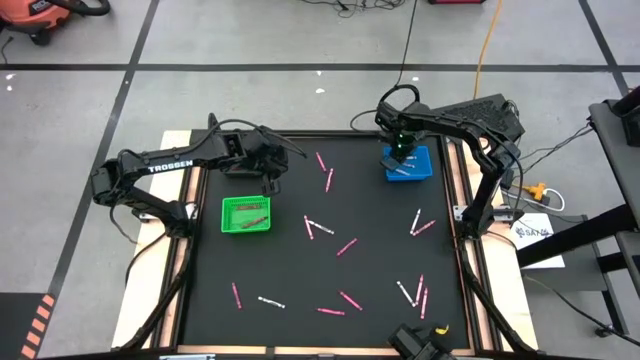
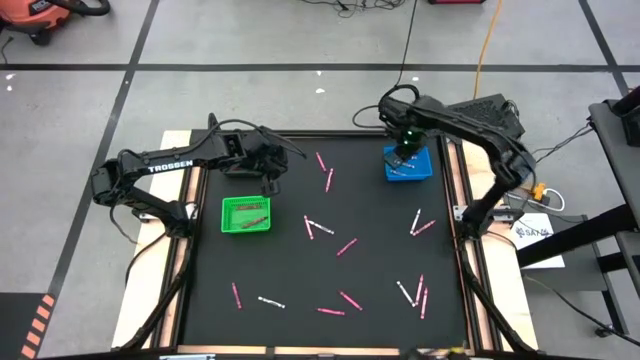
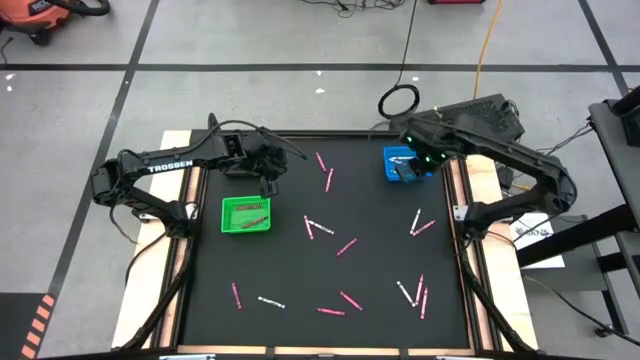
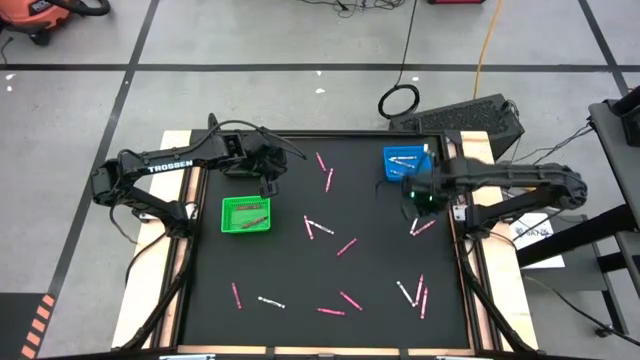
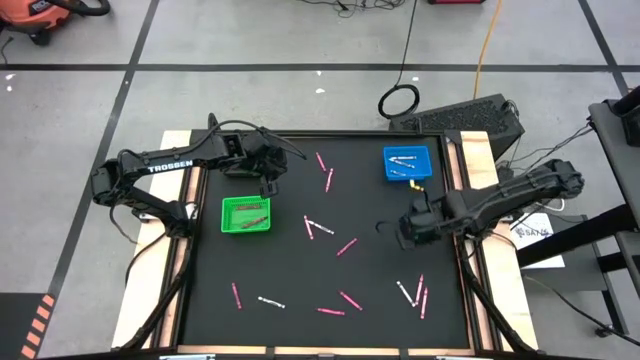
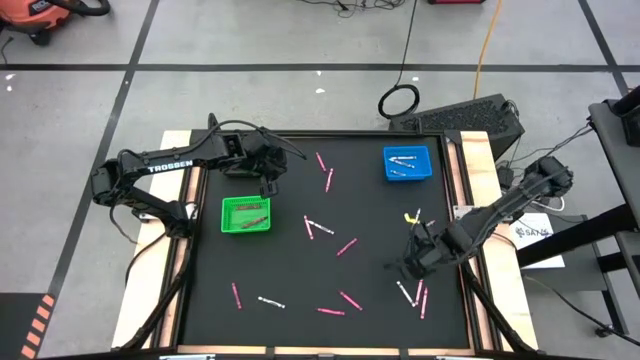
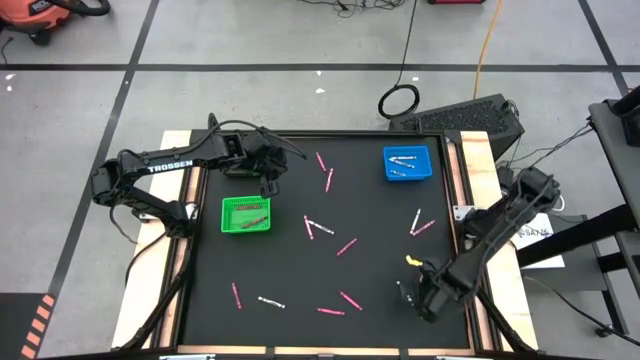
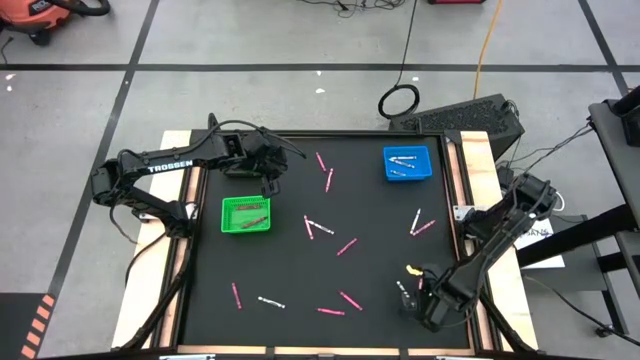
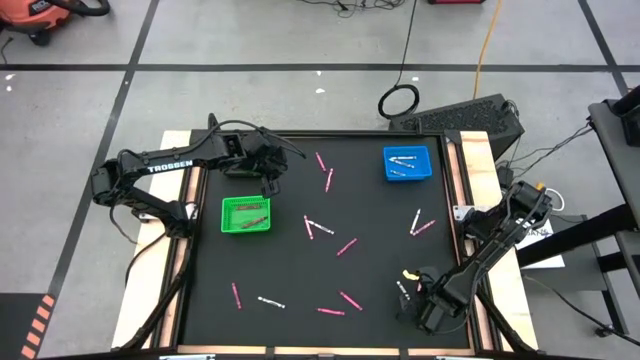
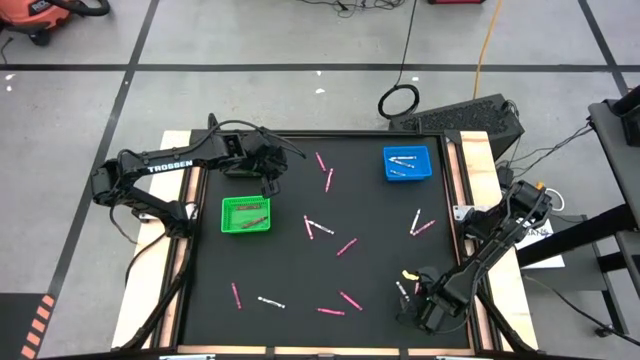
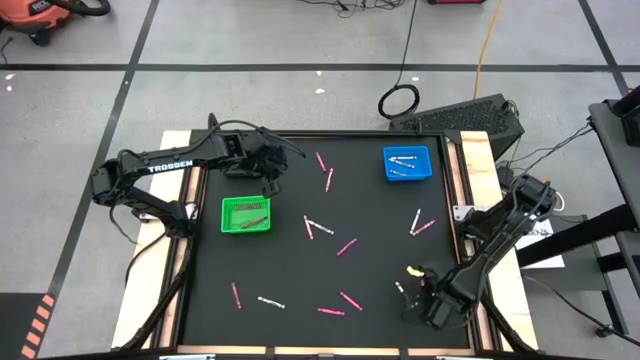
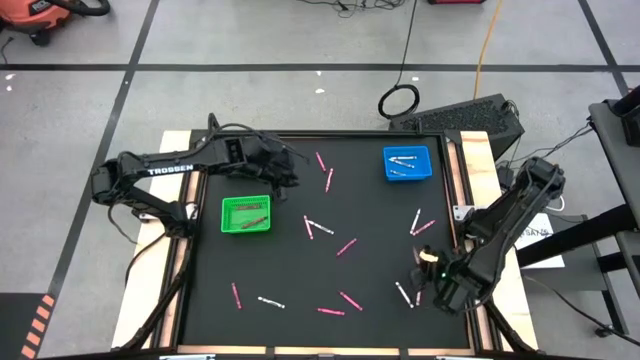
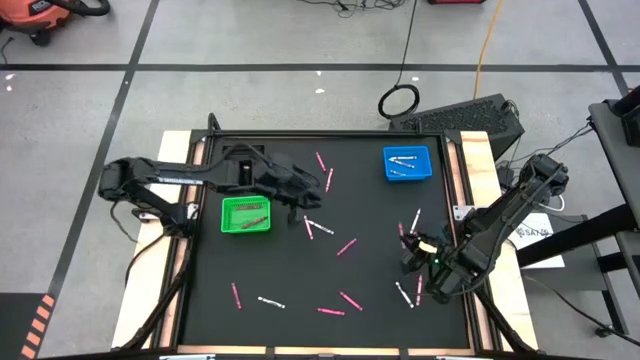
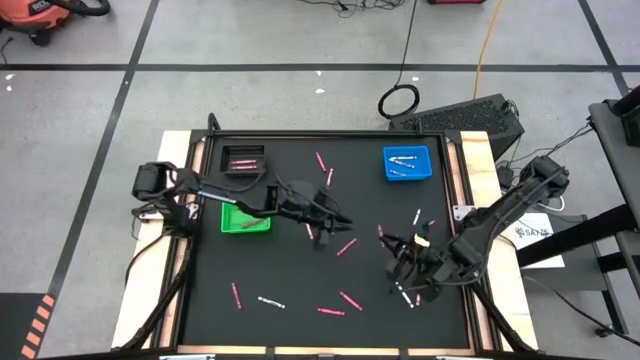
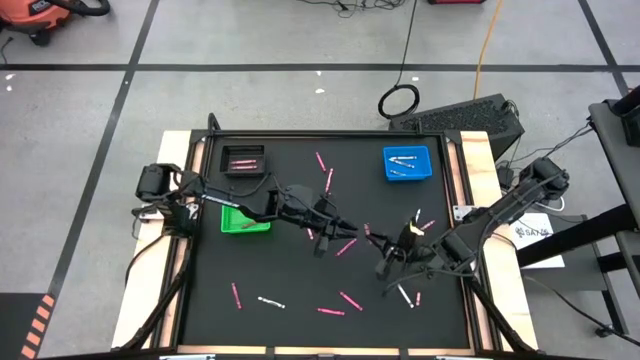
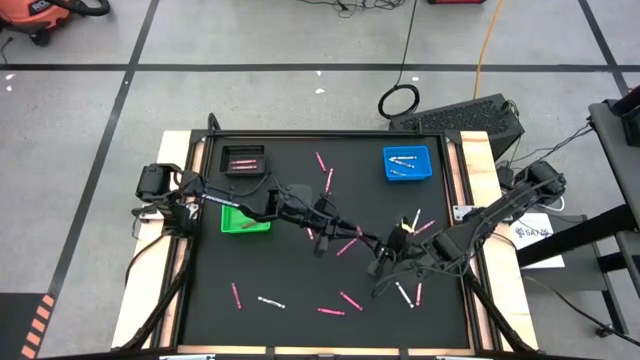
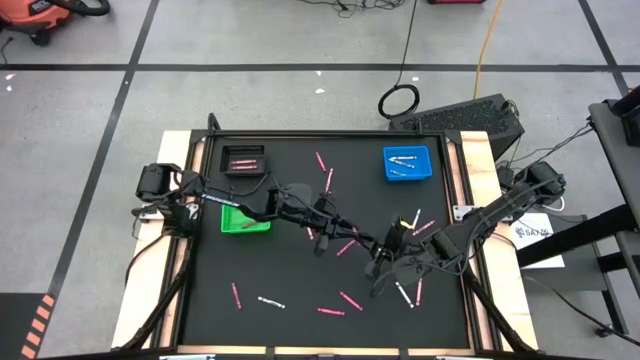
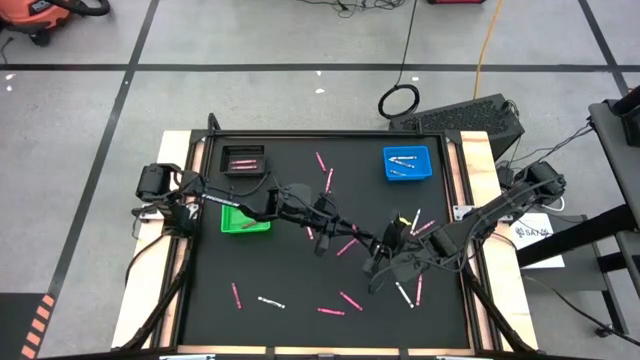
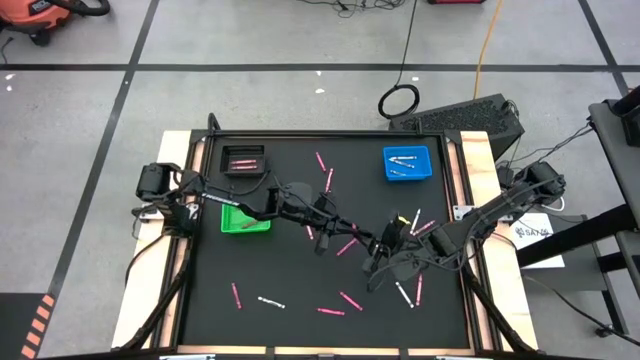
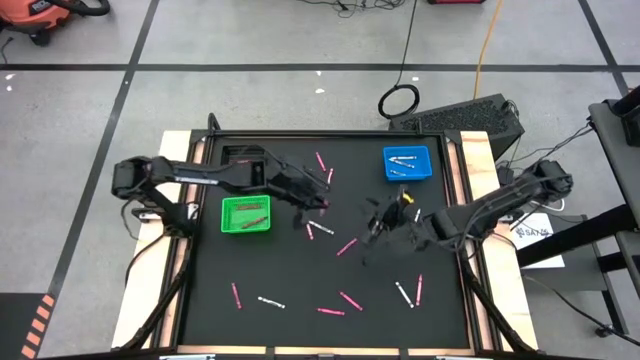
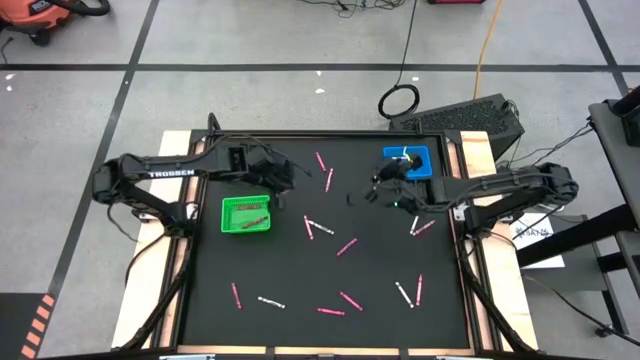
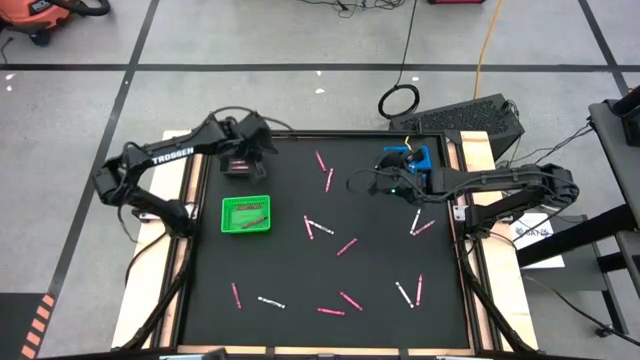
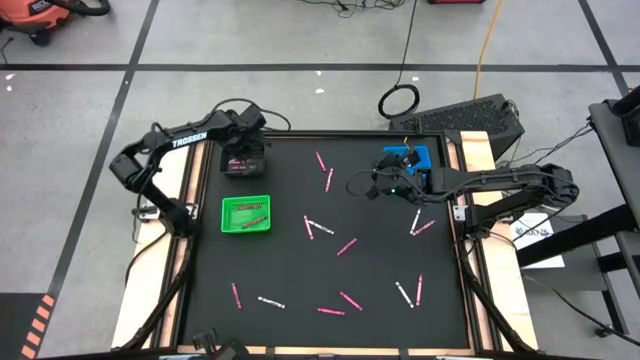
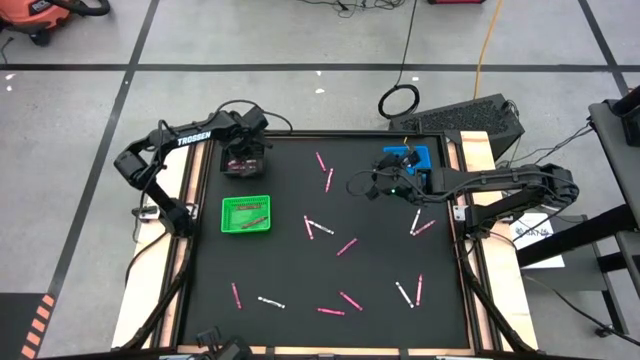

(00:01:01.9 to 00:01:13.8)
Task: Sort crayons
Put the pink crayon into the black bin

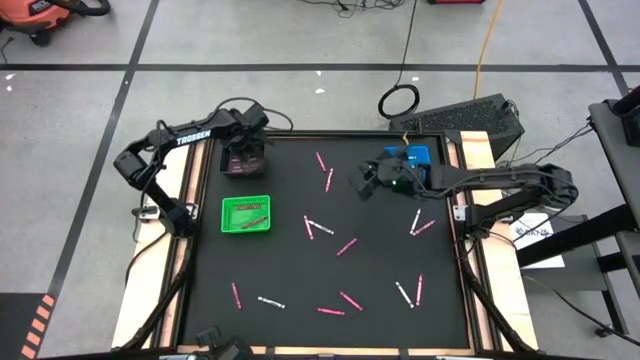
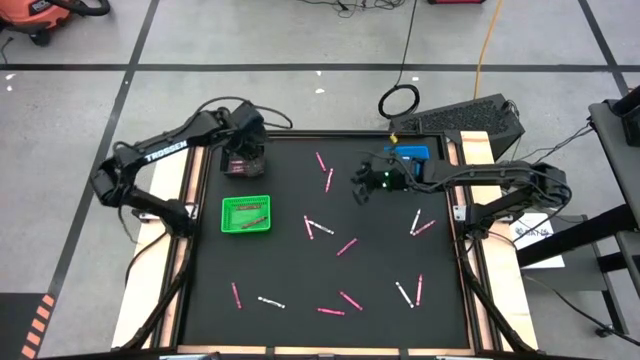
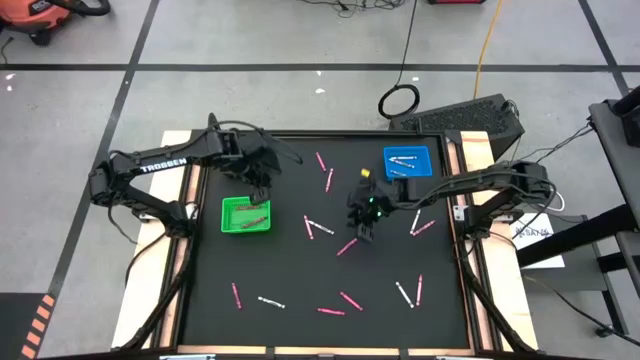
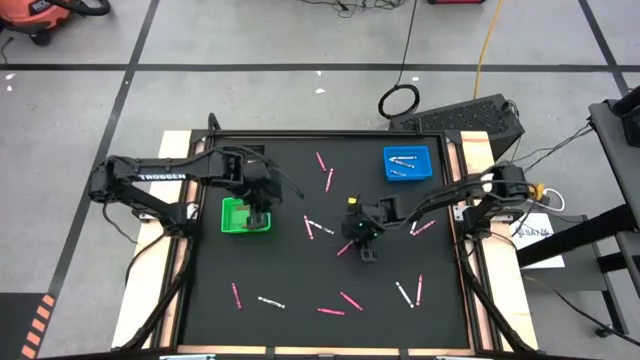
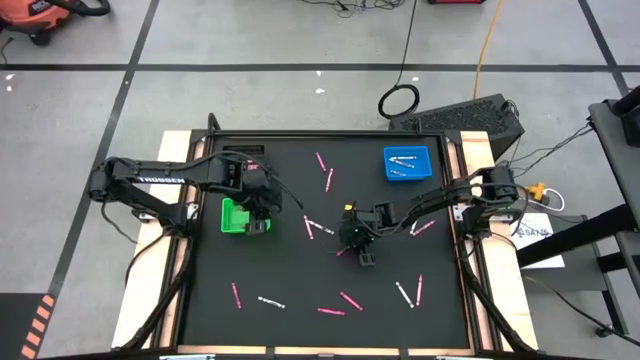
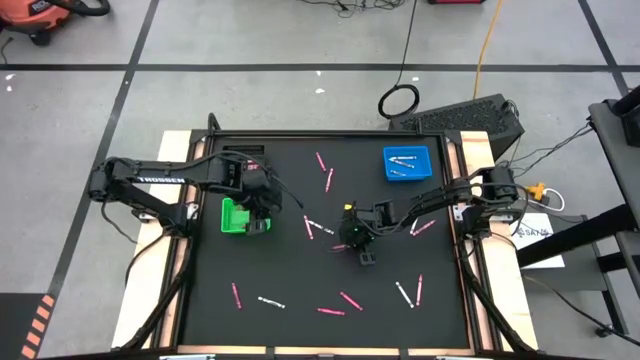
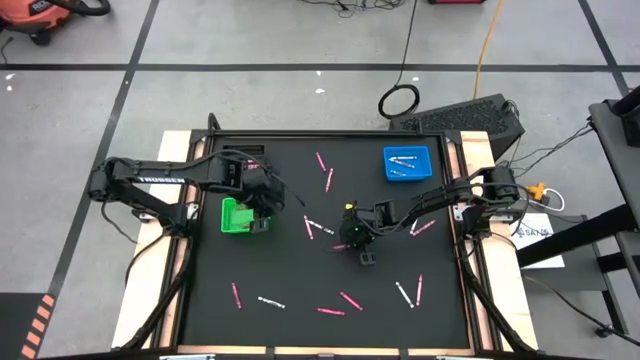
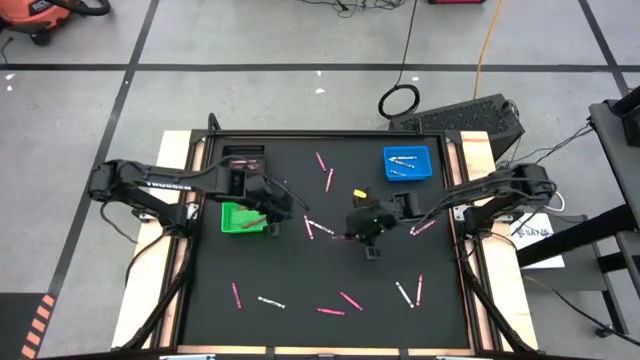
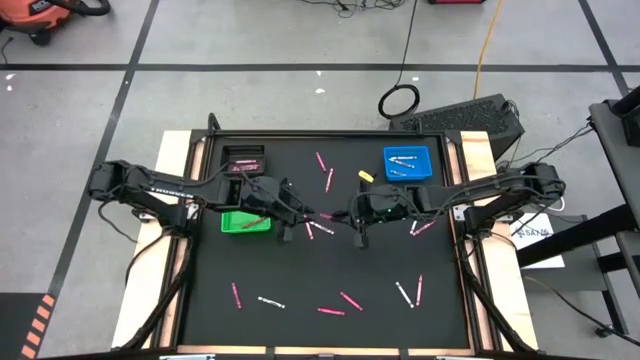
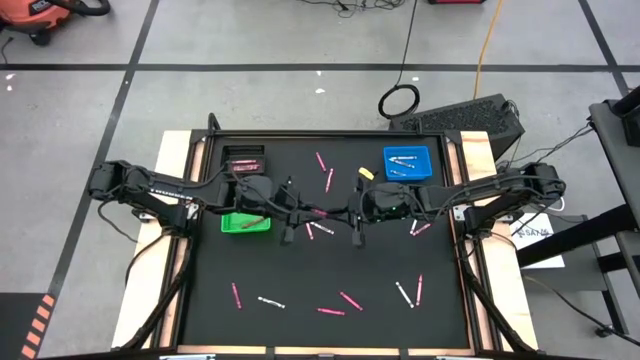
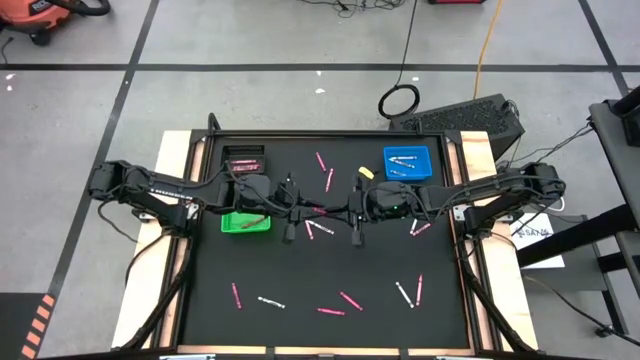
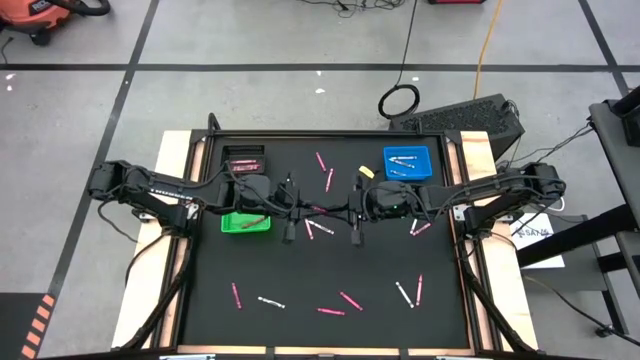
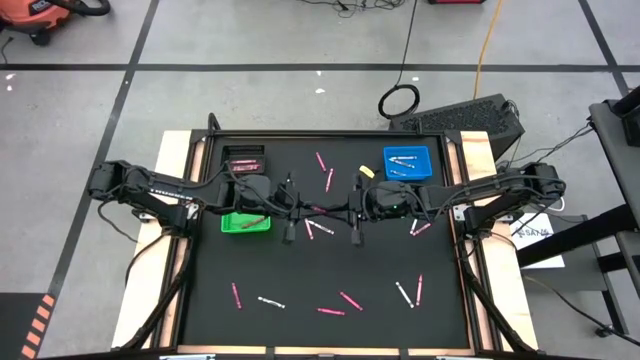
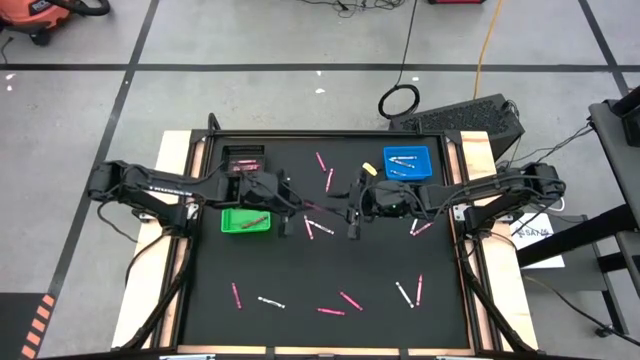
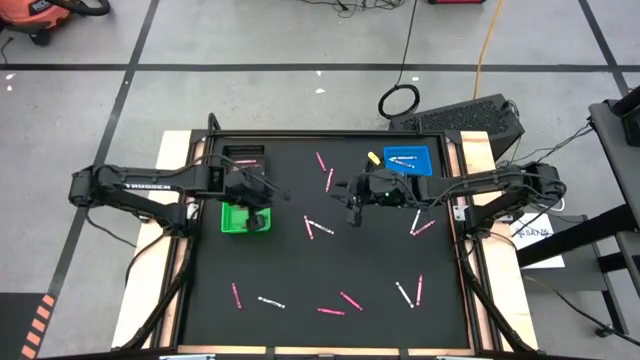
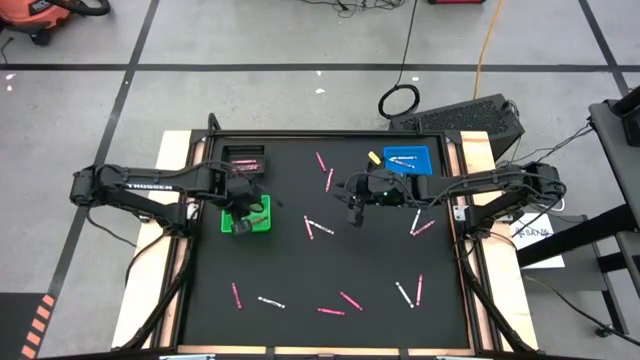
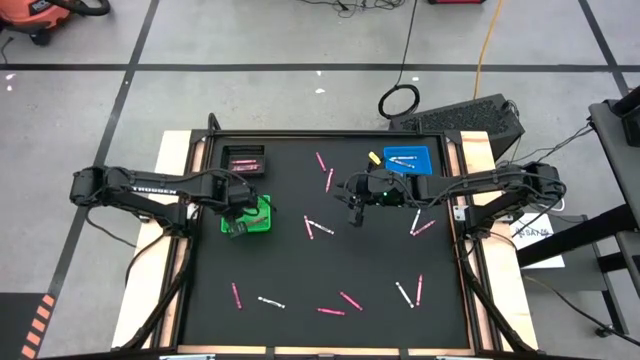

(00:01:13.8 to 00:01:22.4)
Put the red crayon into the green bin
